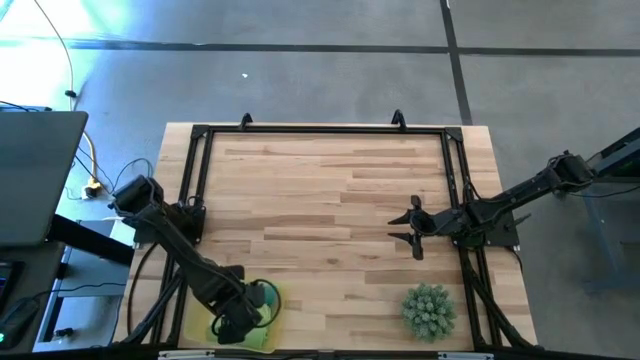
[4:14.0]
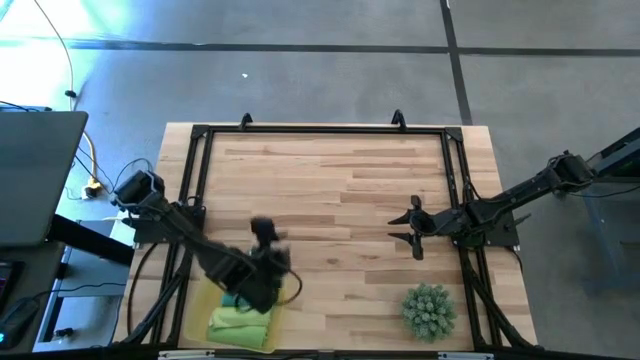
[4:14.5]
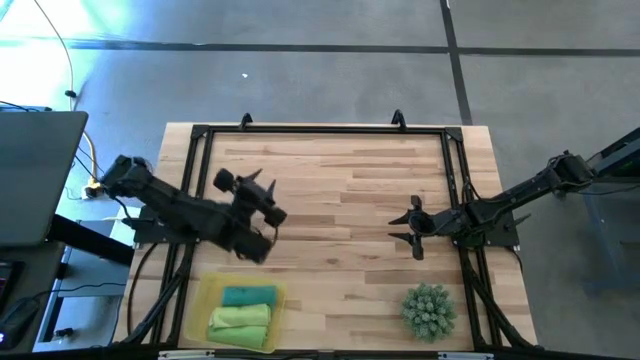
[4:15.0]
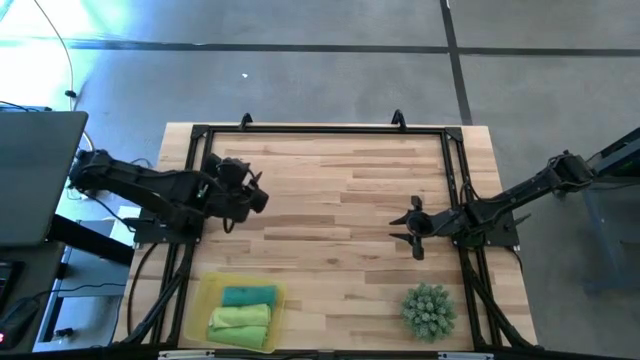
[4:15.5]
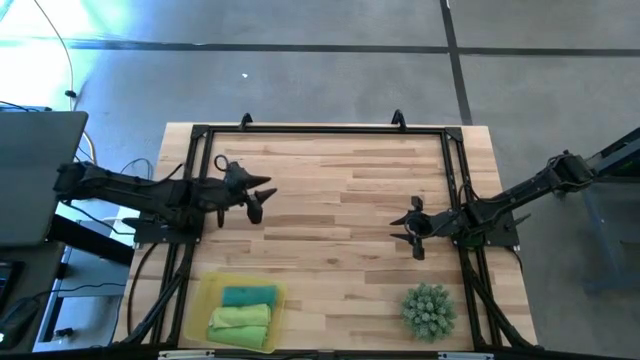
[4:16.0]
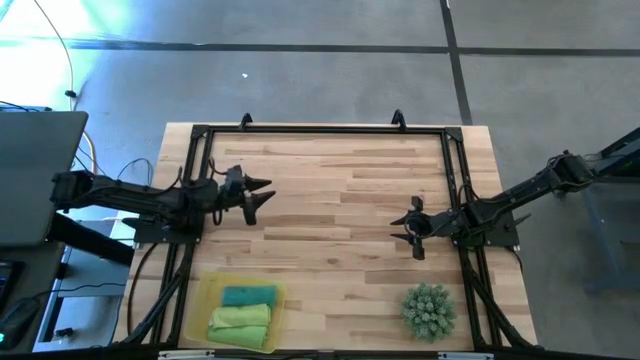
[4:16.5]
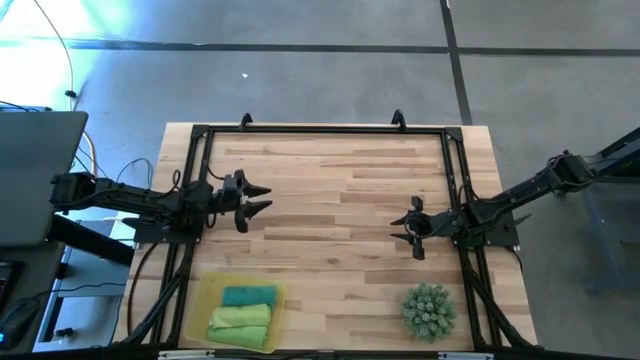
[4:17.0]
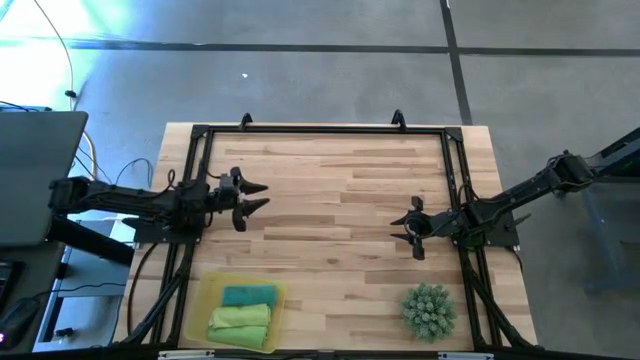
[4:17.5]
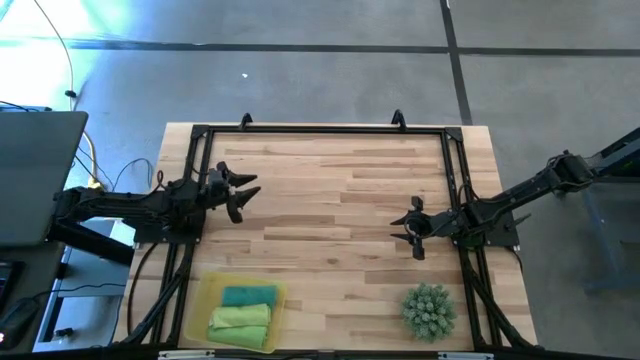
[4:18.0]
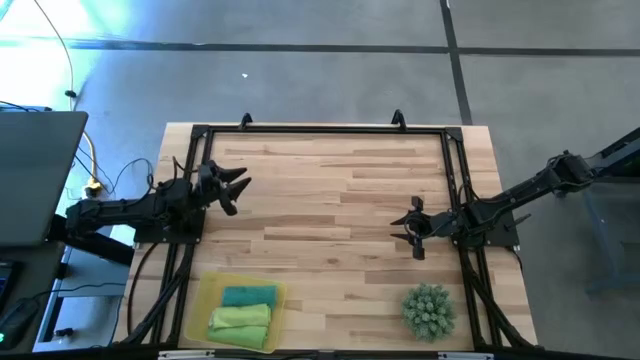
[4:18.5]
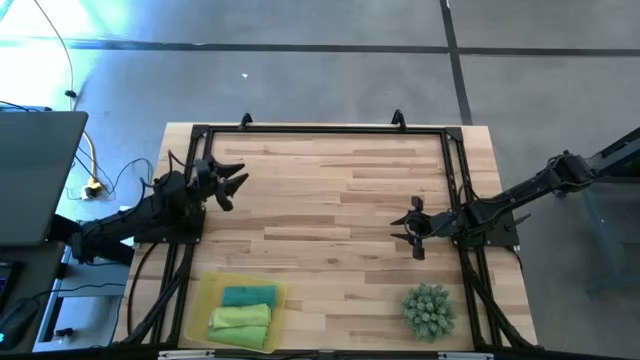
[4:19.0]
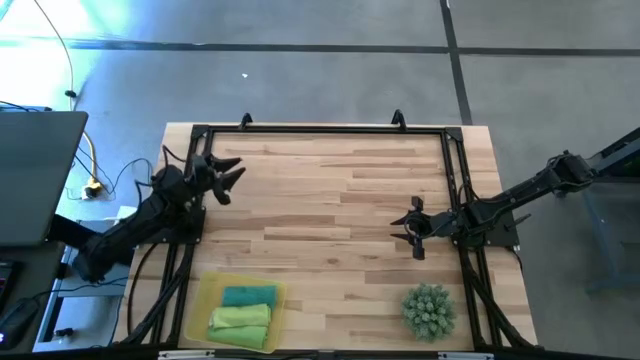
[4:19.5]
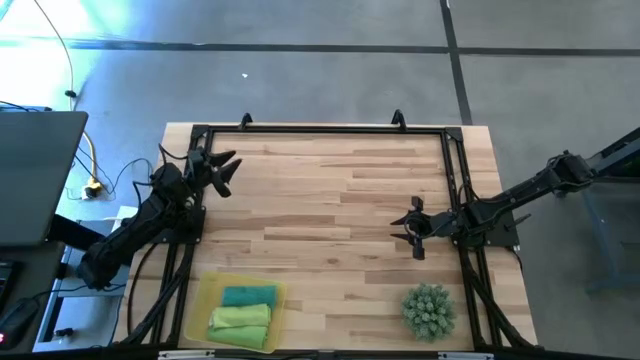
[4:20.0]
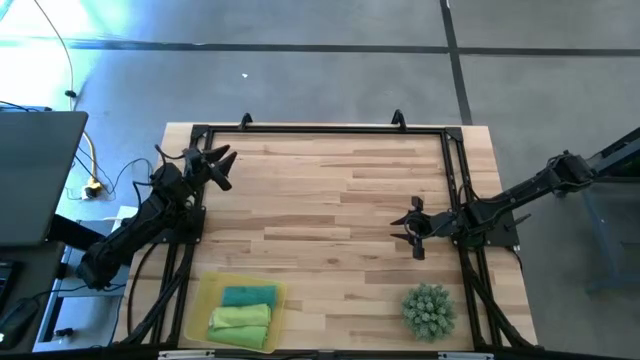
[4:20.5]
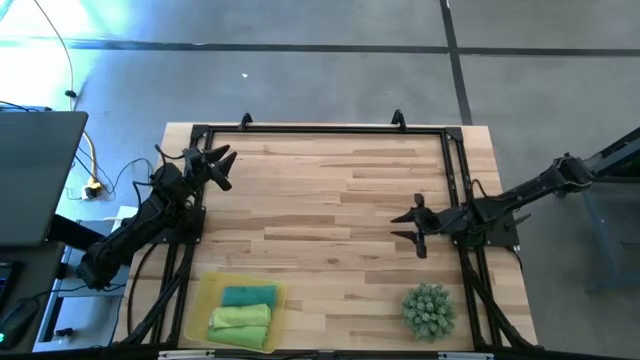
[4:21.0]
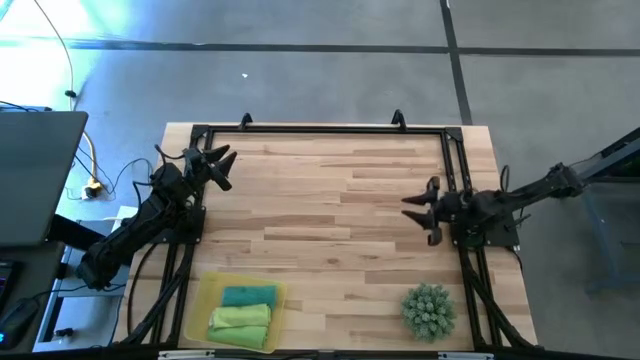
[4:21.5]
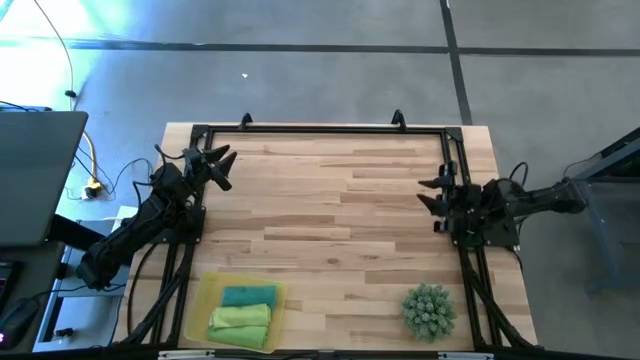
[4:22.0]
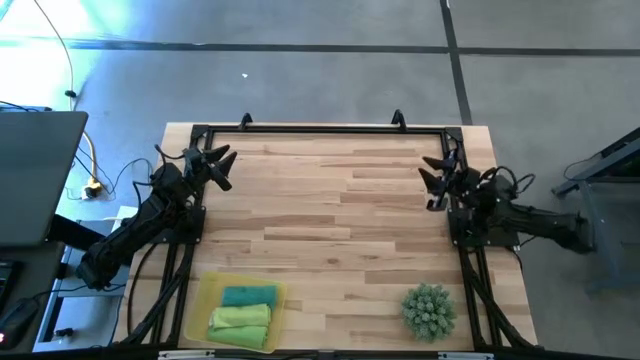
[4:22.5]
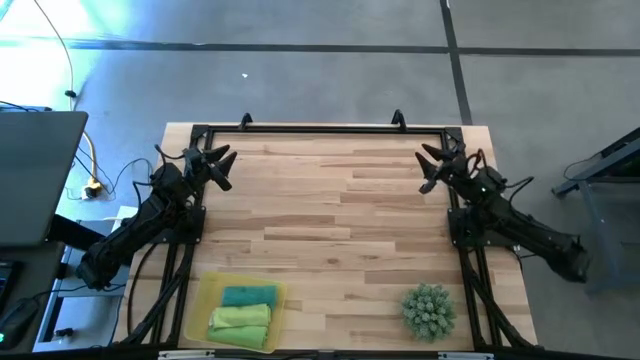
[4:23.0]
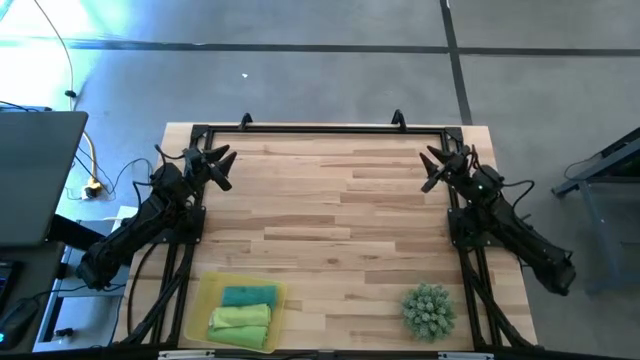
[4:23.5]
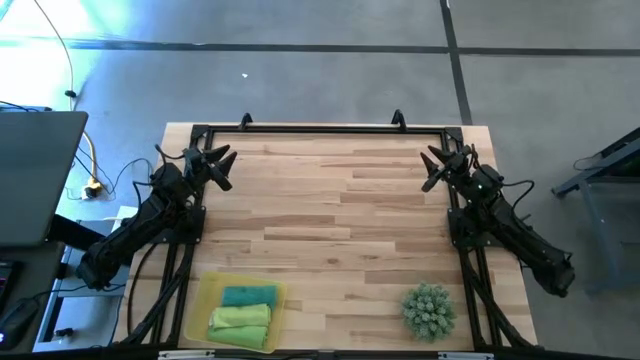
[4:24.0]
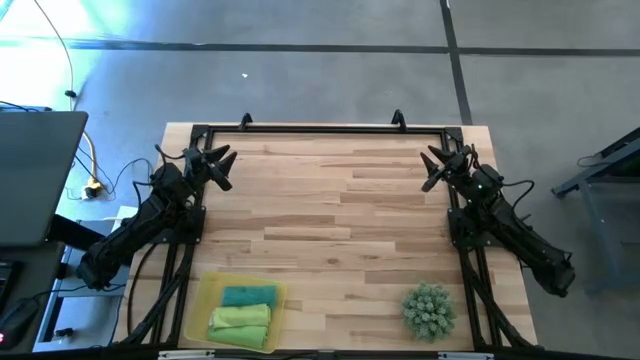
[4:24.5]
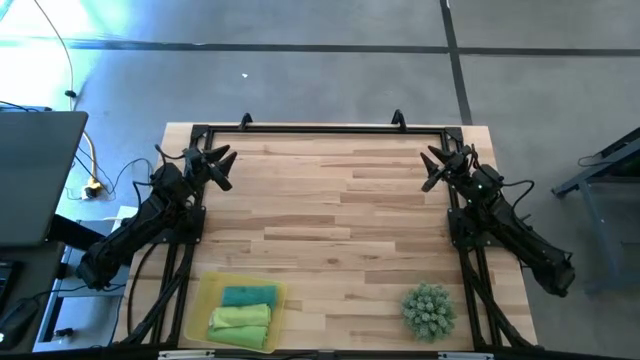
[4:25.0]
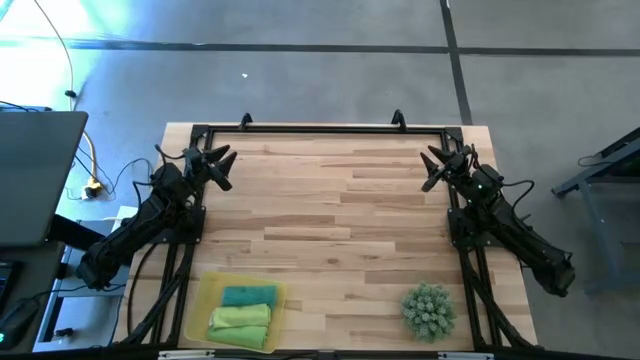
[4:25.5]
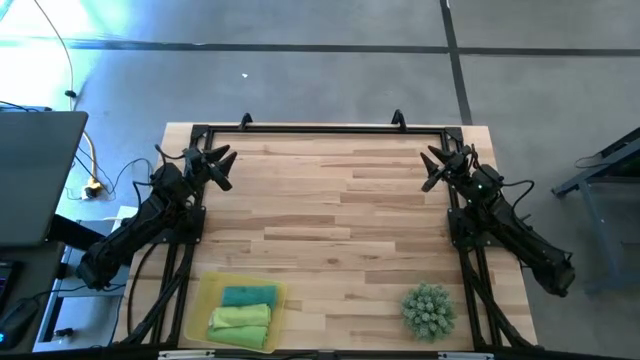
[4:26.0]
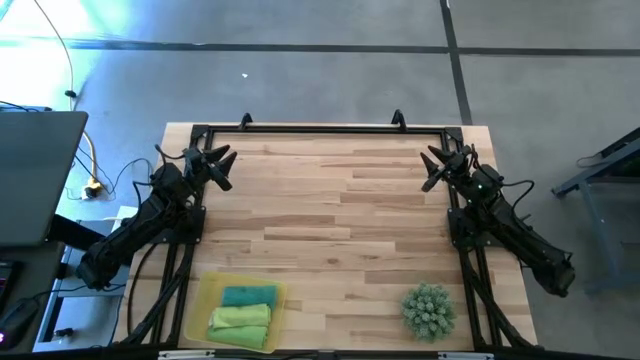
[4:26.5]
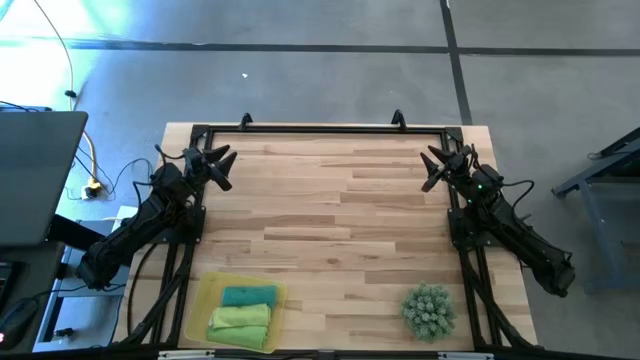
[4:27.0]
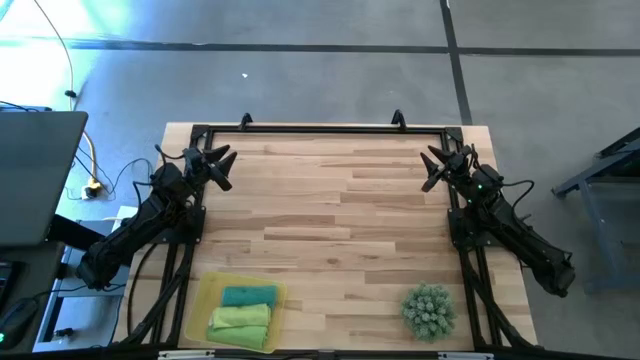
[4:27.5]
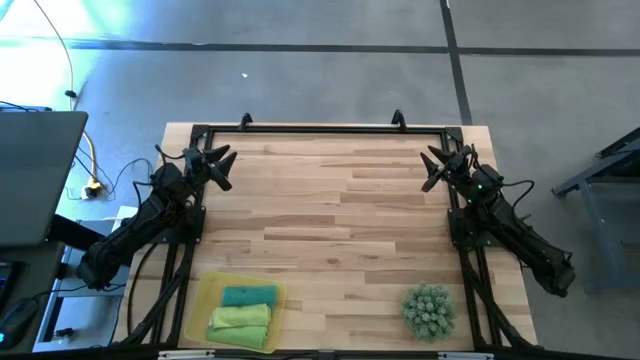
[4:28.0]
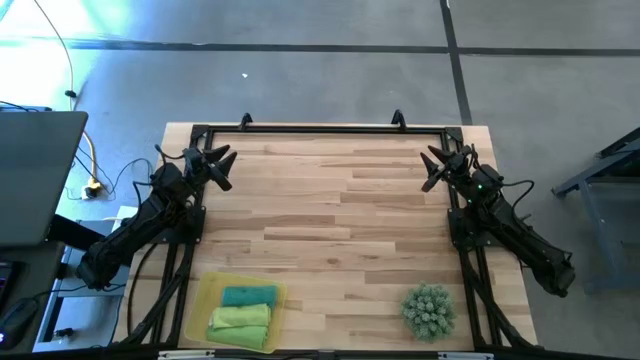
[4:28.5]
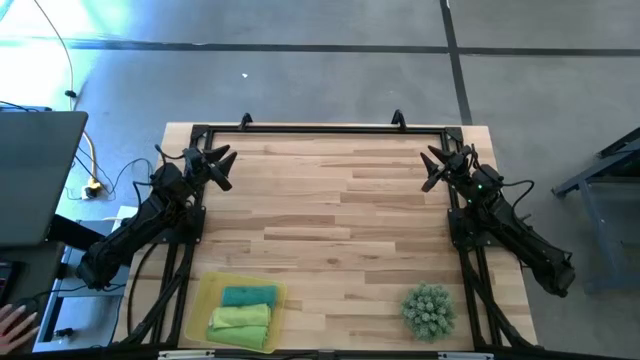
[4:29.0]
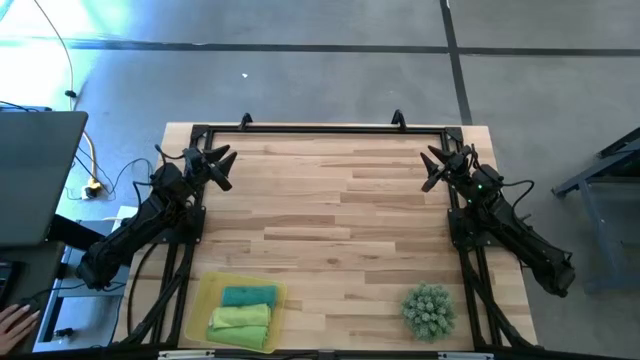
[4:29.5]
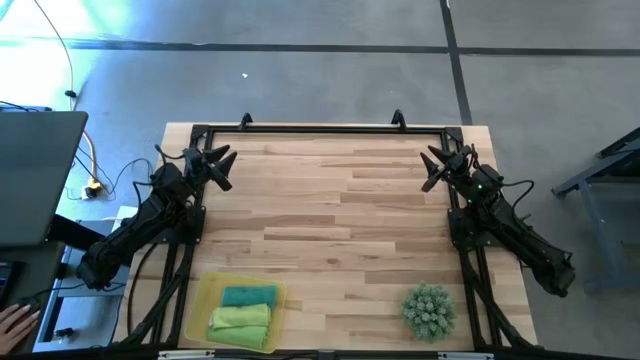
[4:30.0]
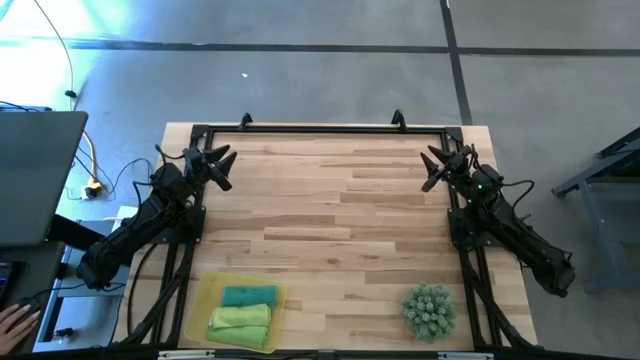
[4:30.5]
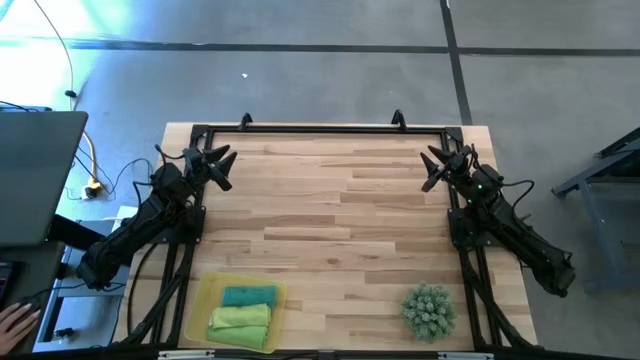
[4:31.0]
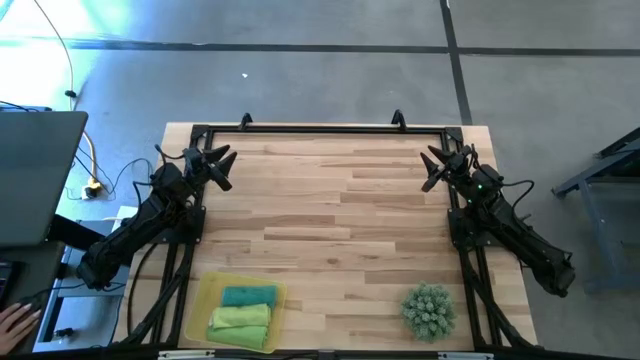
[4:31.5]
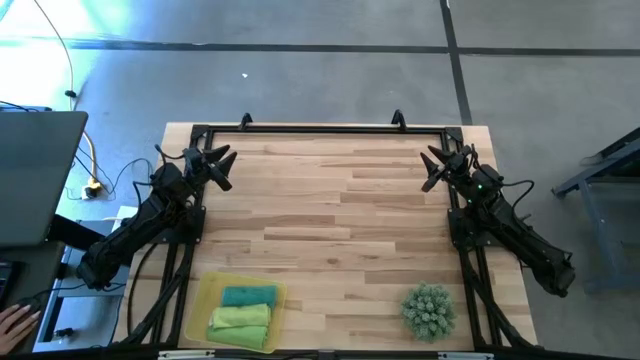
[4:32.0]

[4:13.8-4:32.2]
Task: Roll microfiber towels into tight, uniform cylinder then place into a basket
Return to Home Position
